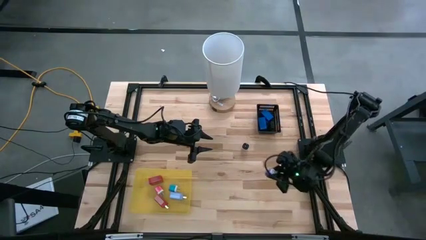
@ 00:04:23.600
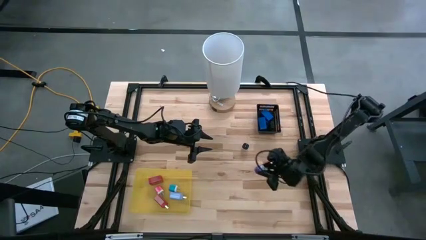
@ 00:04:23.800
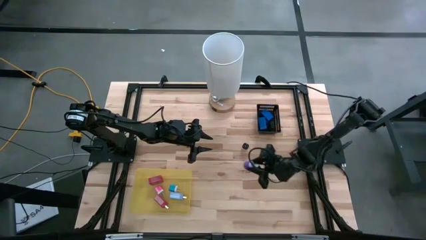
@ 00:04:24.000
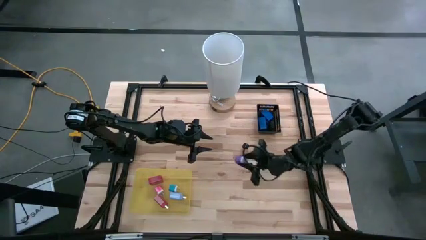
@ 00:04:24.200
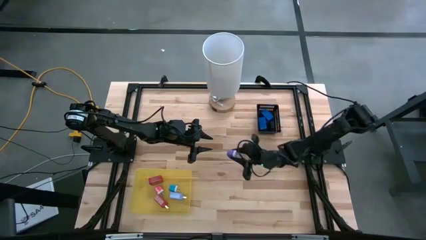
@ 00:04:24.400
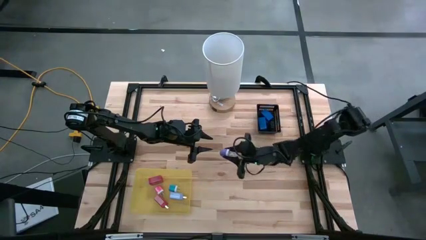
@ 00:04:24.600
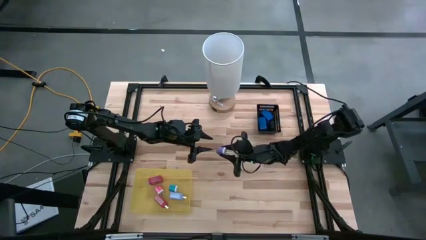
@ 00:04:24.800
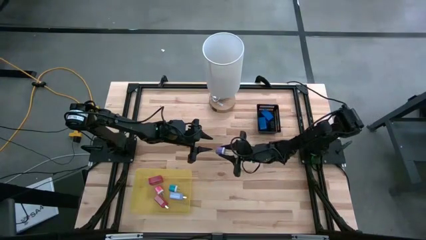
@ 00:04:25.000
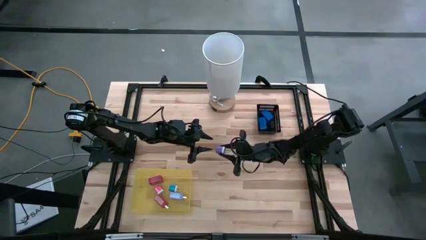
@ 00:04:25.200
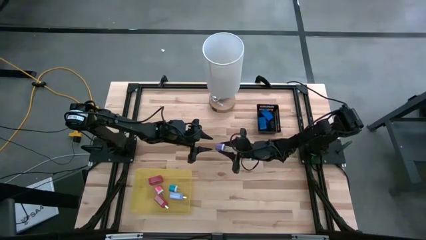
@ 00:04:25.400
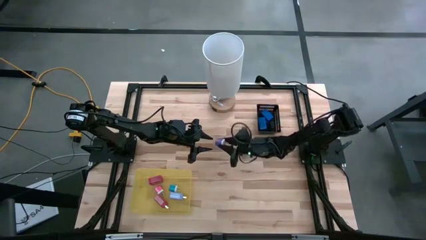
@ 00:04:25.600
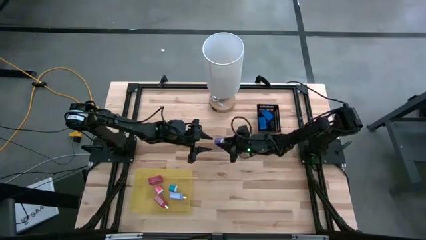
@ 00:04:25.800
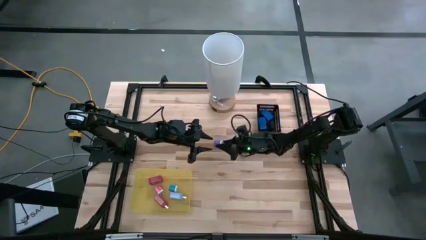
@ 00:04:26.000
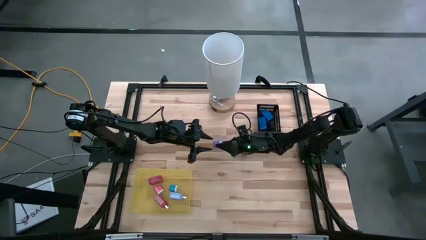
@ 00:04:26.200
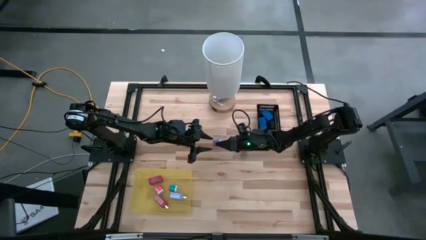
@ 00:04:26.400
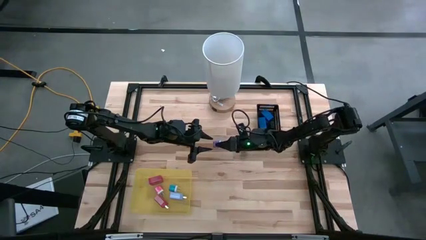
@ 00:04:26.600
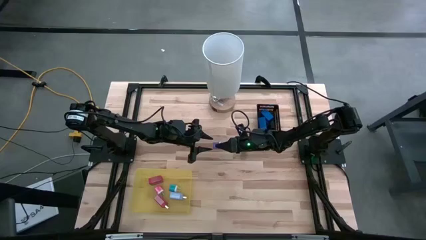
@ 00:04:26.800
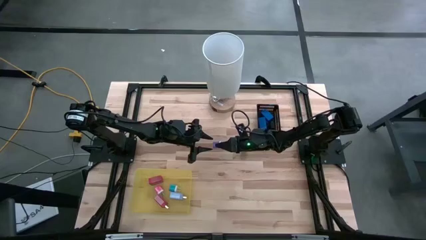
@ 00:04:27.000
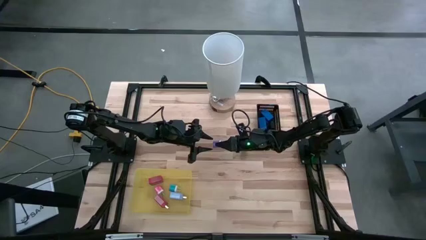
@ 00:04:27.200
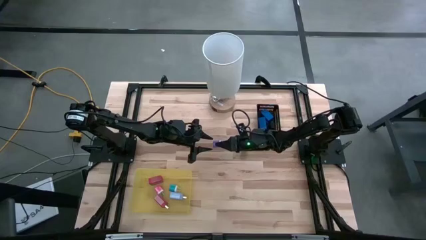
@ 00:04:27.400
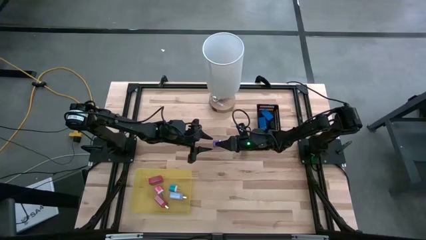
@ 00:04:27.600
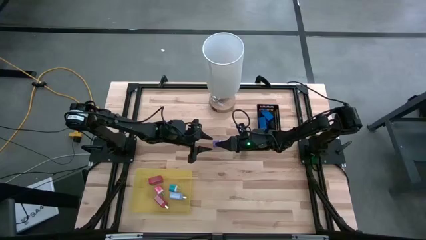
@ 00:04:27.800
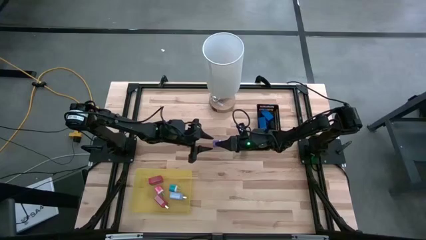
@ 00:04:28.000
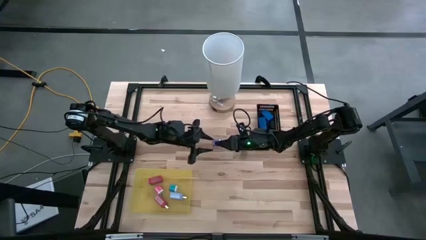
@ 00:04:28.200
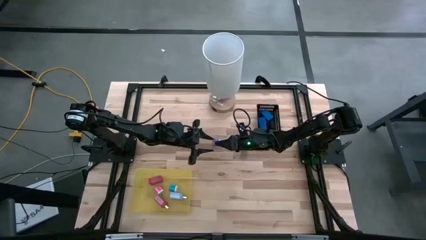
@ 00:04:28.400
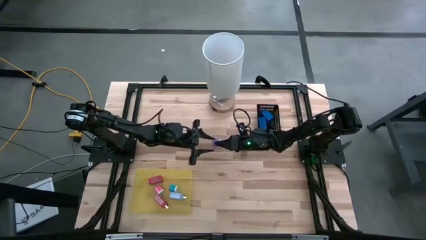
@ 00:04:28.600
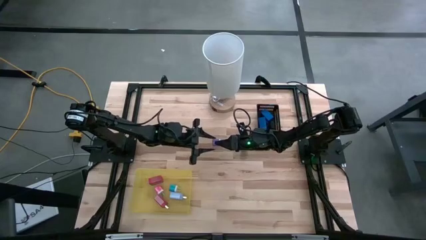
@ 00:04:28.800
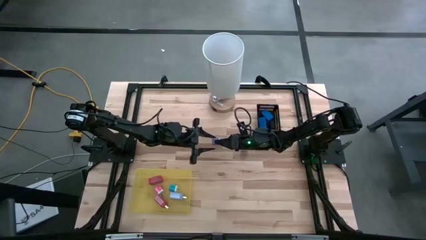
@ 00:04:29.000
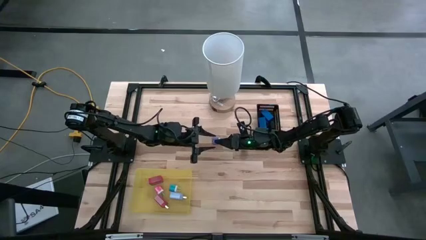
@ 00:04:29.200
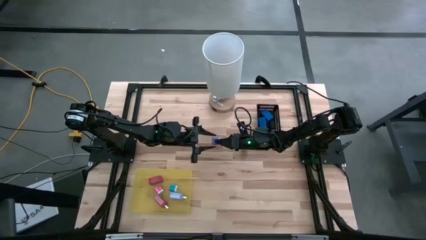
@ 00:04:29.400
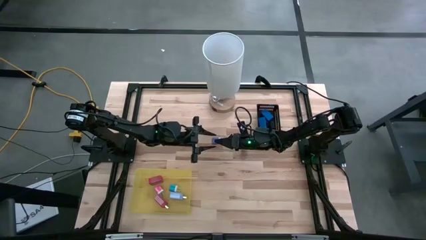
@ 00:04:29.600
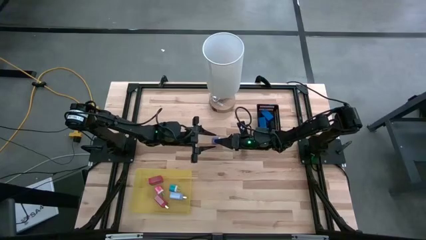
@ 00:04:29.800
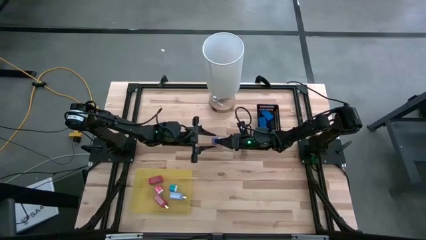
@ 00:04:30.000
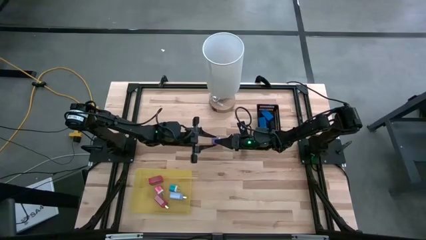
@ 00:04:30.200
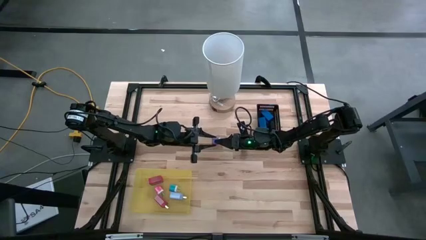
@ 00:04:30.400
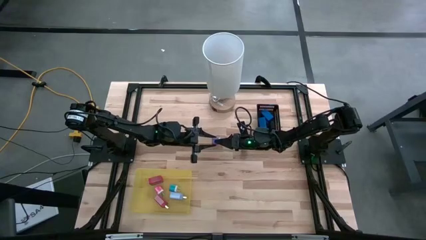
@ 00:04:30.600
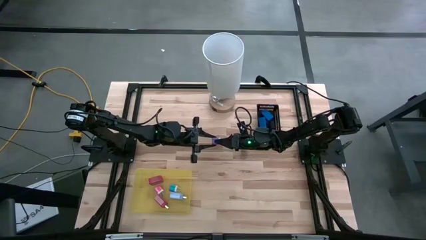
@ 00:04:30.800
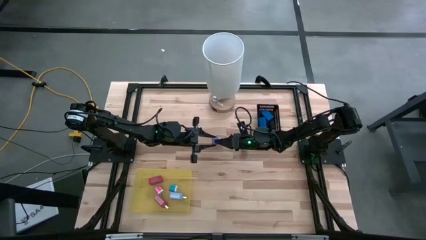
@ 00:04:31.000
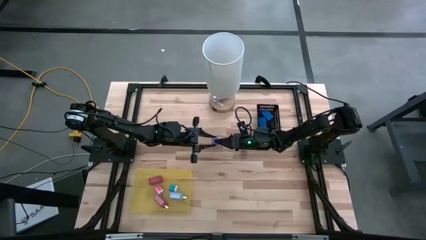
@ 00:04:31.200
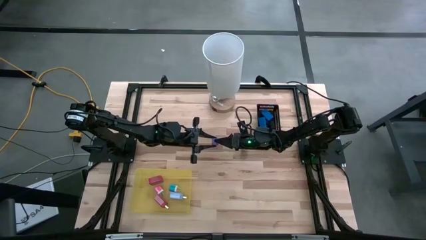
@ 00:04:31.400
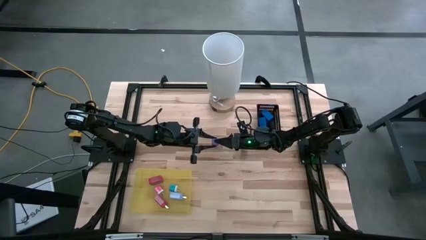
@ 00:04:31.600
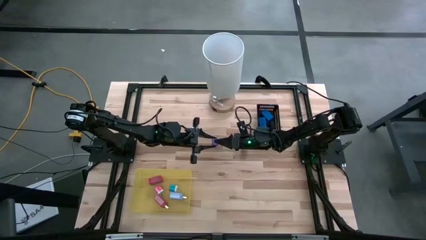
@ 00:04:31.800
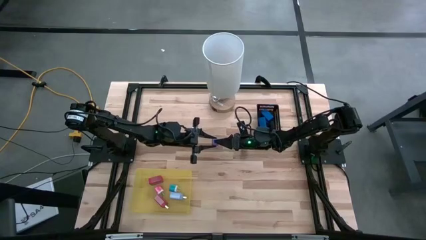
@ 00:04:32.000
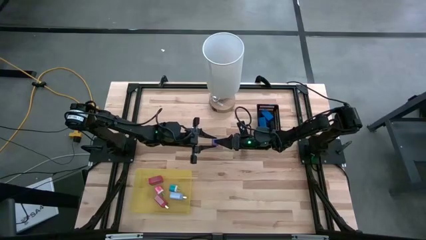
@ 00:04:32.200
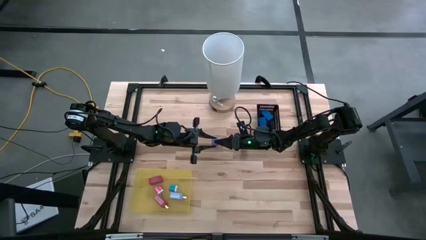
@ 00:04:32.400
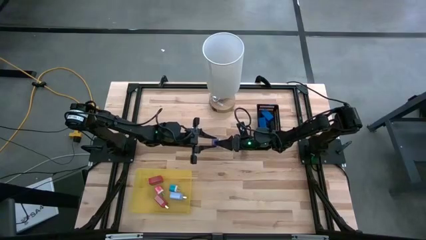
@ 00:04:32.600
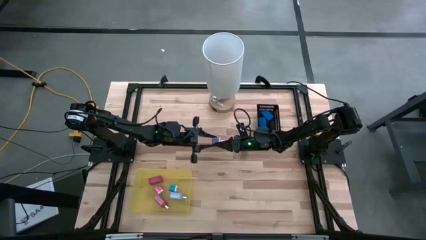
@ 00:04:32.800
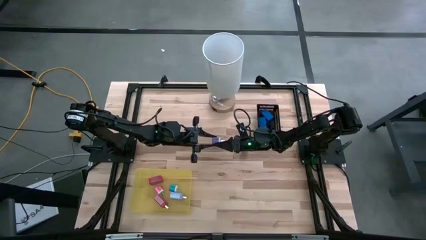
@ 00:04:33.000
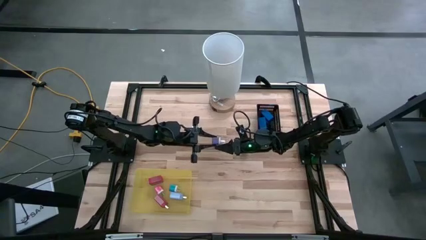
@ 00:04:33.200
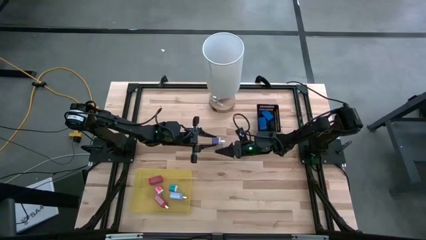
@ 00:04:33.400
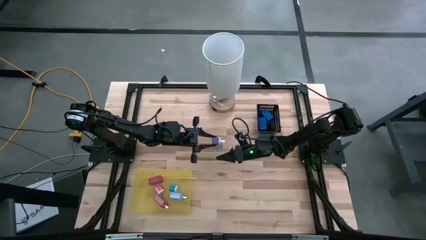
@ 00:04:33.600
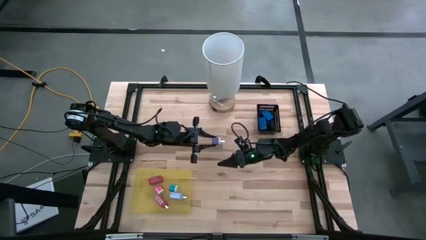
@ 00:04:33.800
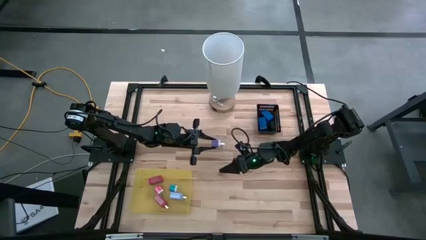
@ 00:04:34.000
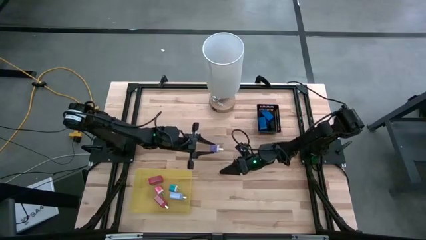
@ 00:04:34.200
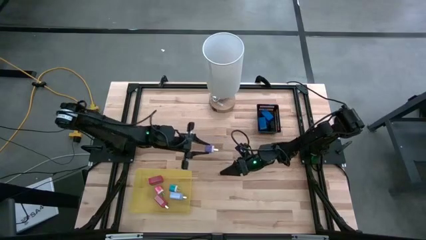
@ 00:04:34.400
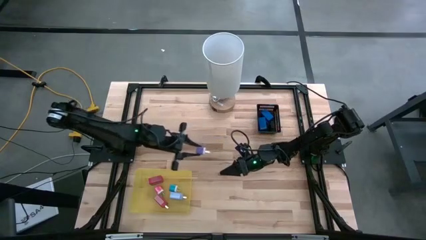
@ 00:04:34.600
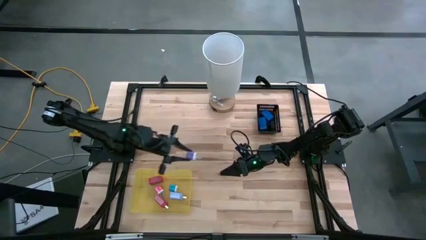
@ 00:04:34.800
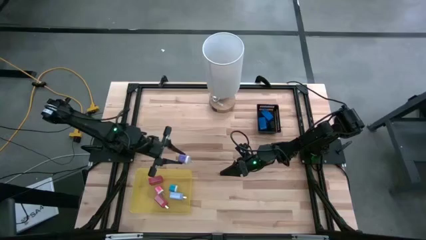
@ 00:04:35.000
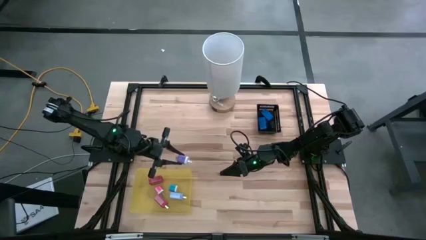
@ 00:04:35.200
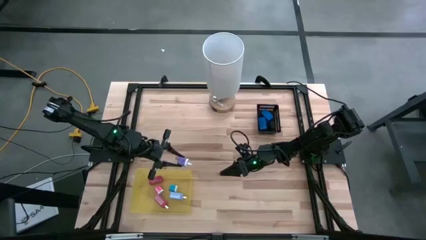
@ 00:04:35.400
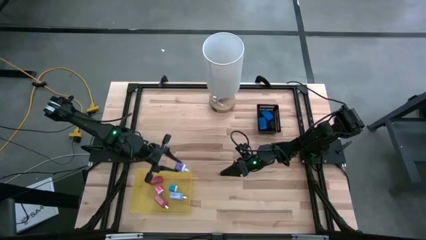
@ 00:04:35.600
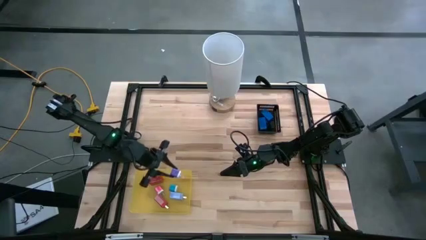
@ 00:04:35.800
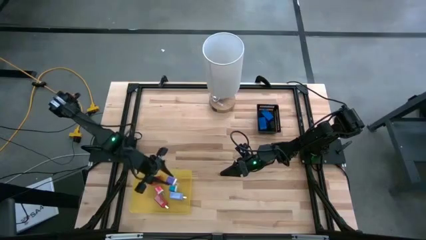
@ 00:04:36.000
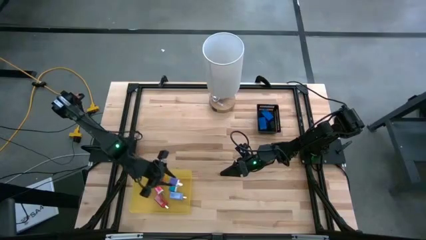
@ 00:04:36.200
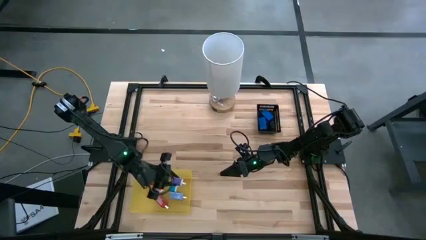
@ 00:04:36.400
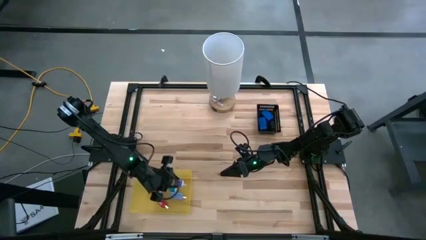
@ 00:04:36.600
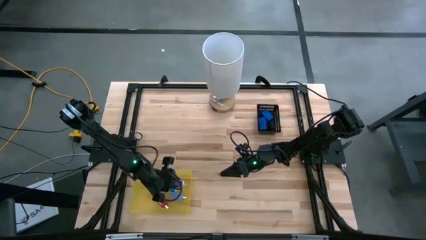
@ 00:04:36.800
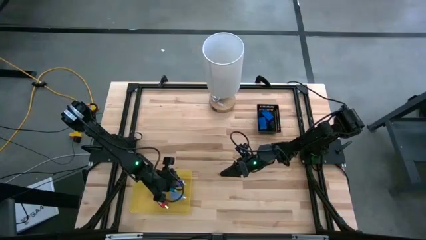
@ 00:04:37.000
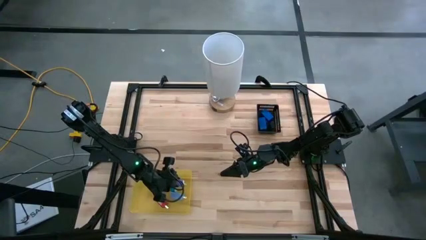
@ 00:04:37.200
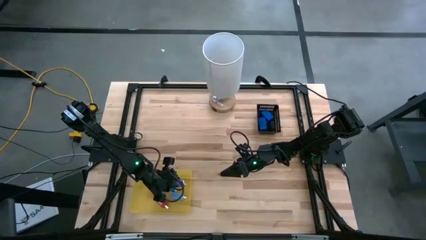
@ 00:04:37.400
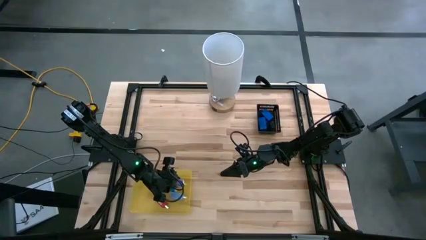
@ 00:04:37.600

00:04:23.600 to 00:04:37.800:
Task: Pick & Place Office items
Put the violet charger adapter into the yellow bin
